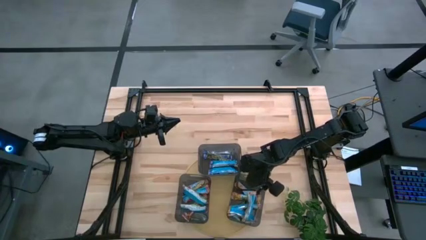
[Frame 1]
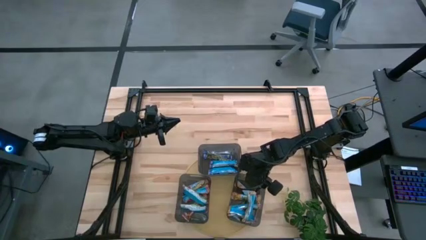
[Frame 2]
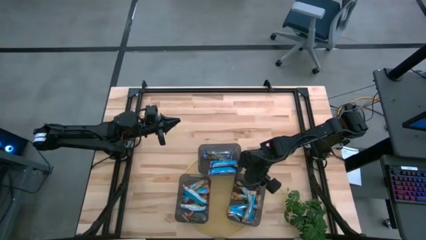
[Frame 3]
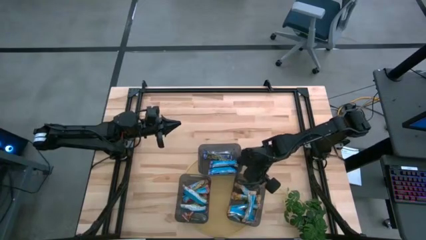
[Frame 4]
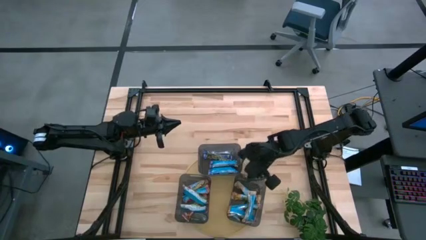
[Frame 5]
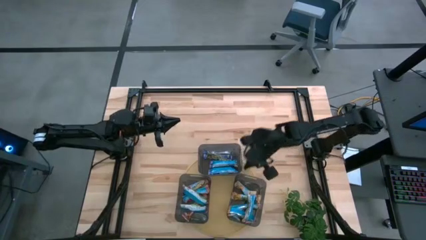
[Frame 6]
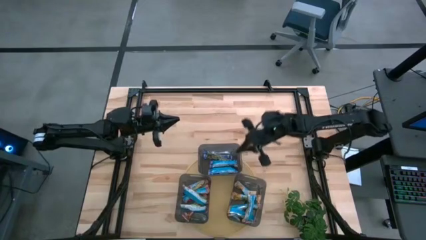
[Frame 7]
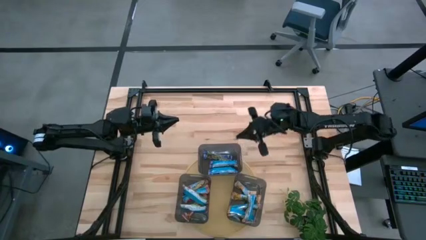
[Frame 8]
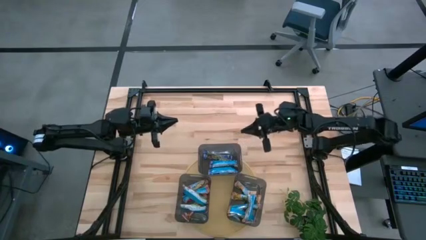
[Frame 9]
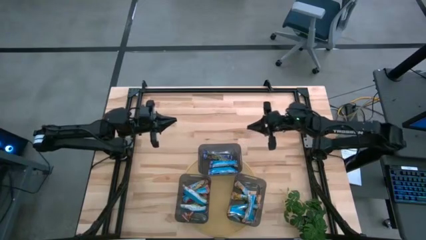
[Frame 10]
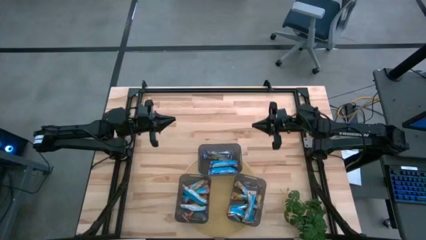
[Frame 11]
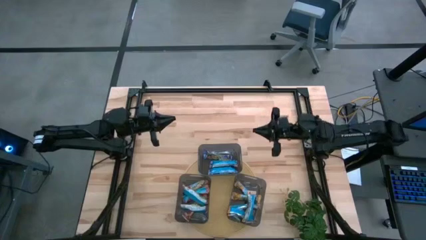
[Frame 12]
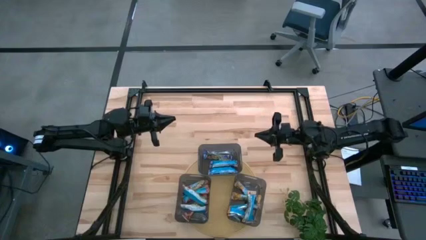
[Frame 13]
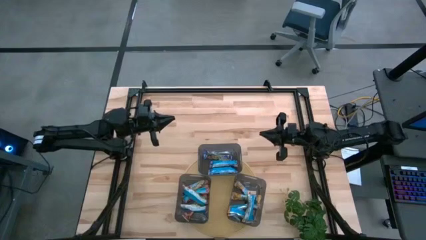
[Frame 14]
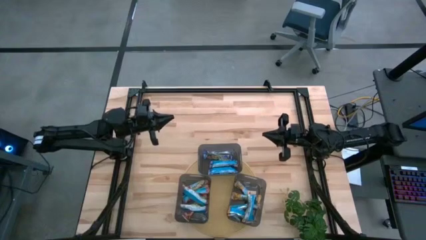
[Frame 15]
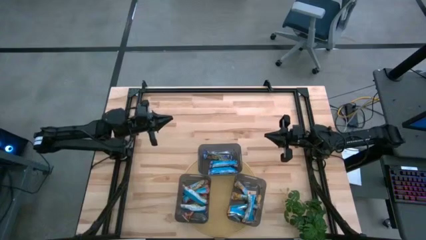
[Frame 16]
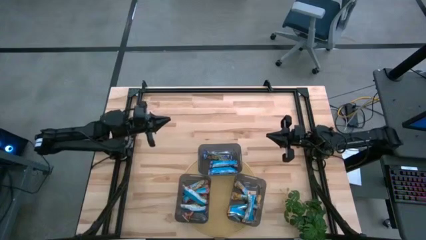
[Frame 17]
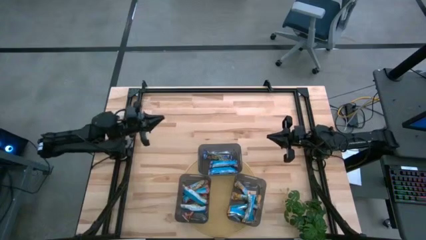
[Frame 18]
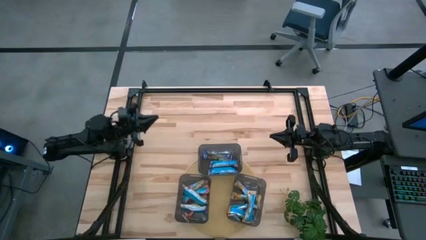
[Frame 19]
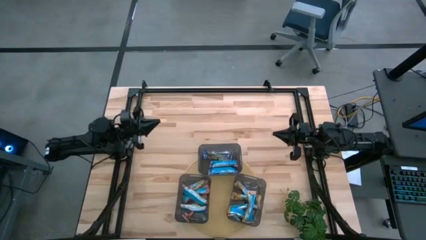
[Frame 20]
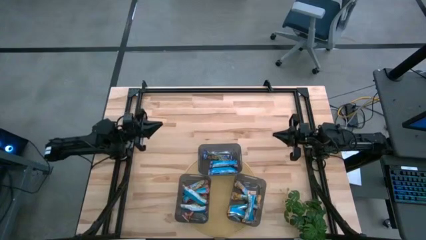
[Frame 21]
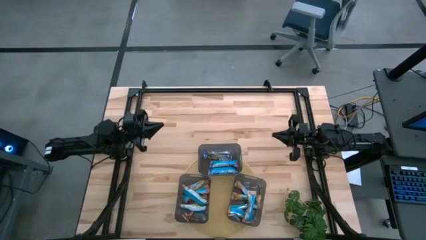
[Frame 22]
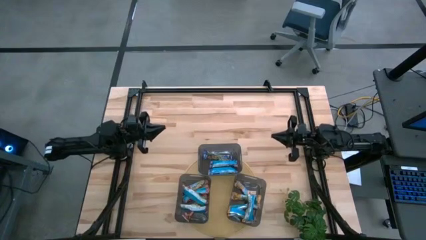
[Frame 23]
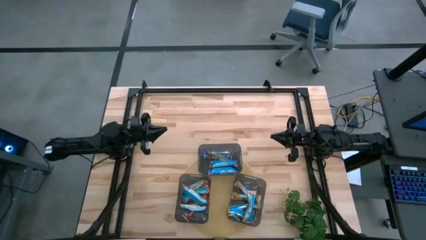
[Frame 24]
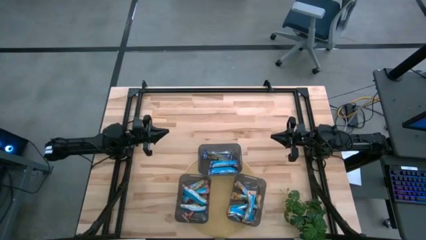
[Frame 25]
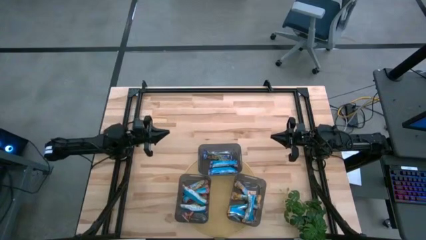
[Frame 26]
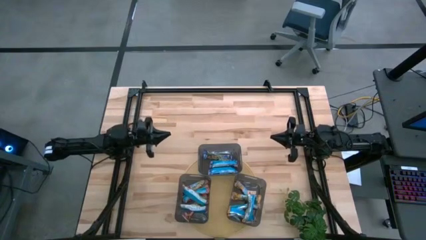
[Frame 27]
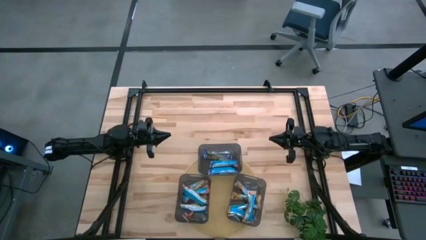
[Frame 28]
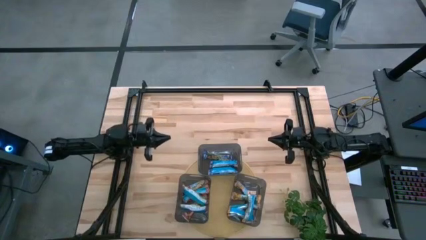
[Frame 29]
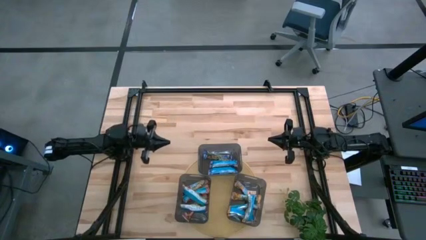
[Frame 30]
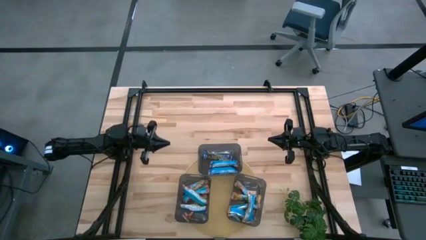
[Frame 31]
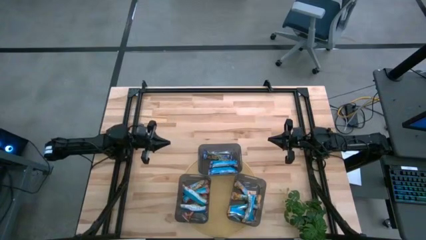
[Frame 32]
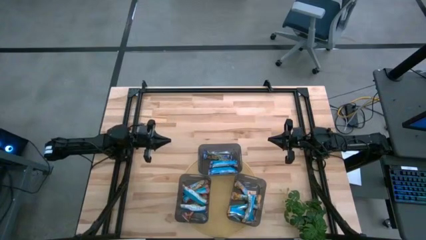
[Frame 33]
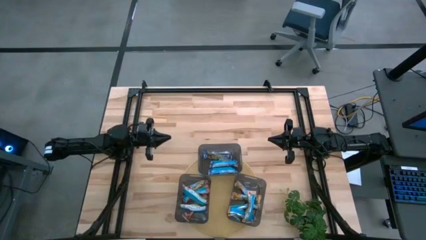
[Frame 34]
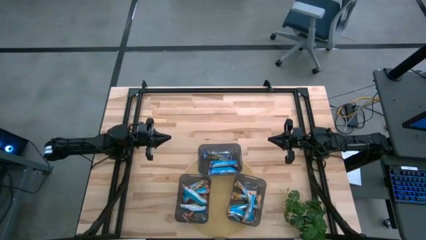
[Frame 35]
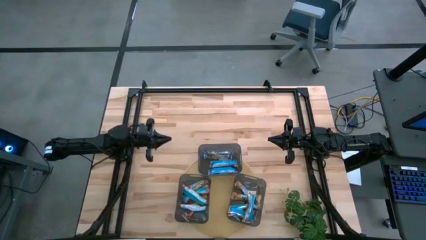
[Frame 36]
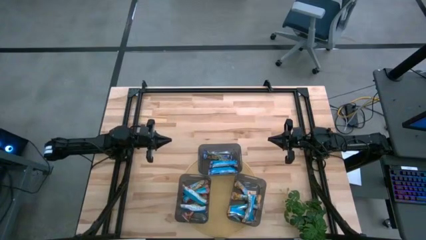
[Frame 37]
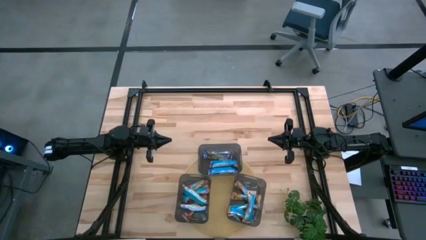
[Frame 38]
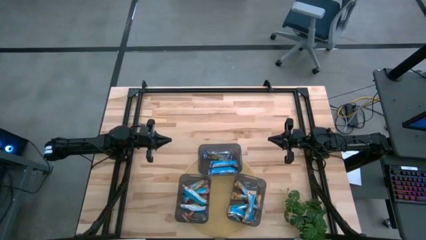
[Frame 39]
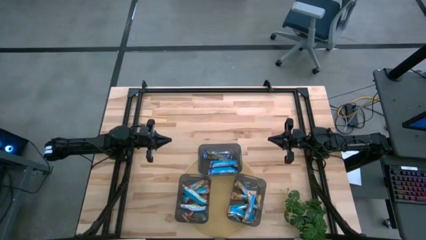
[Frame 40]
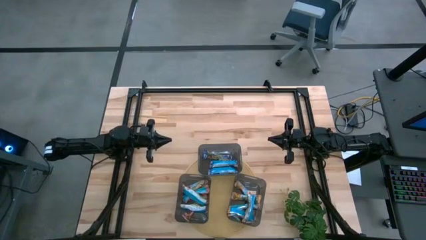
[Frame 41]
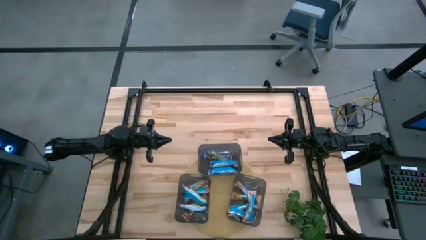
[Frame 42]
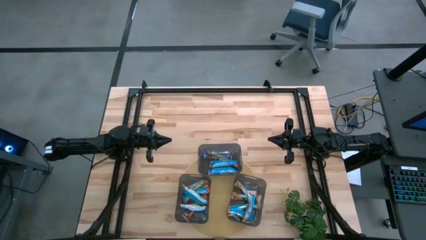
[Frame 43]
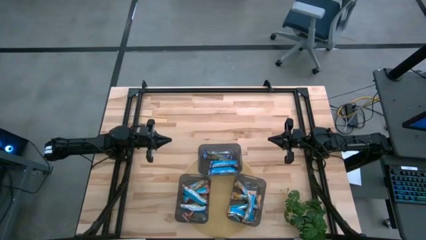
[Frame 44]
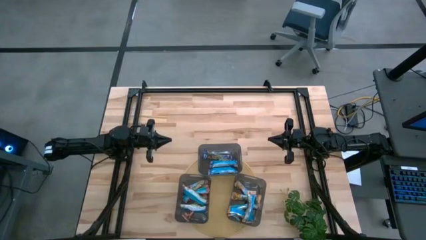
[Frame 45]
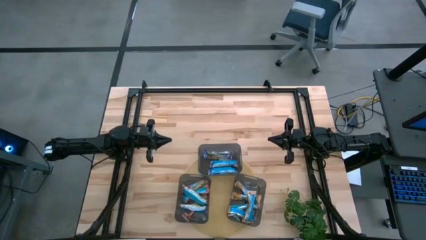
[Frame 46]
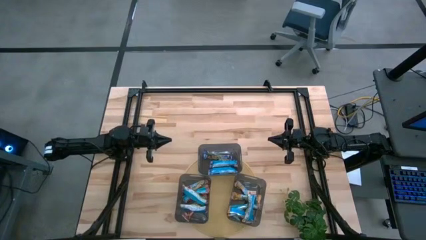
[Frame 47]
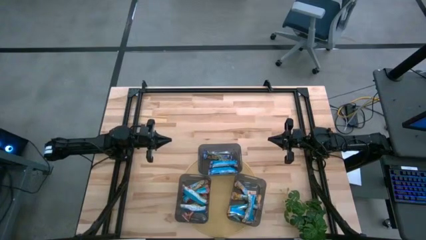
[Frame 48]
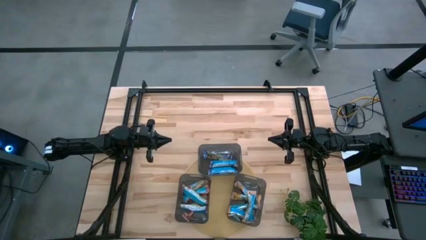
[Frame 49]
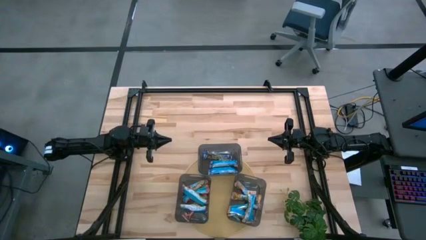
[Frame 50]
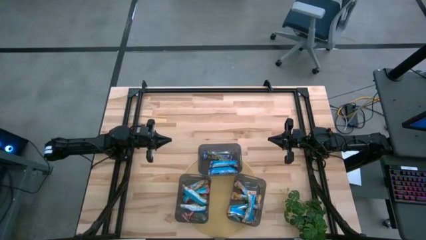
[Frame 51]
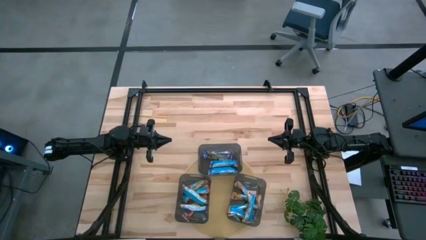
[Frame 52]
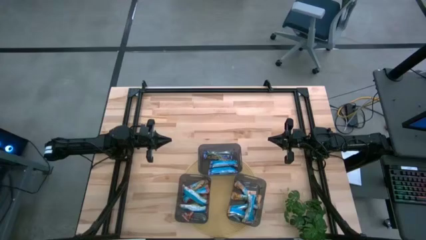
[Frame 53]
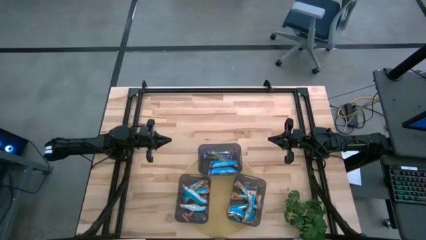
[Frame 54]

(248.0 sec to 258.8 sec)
Task: Pick and place Granola Bars by type
Return to Home Position

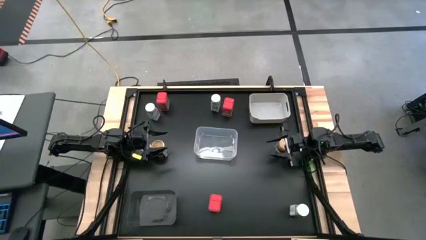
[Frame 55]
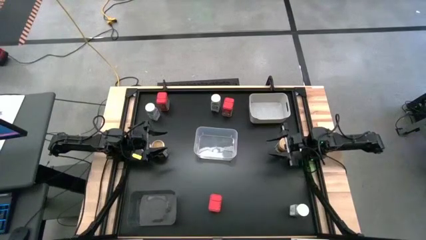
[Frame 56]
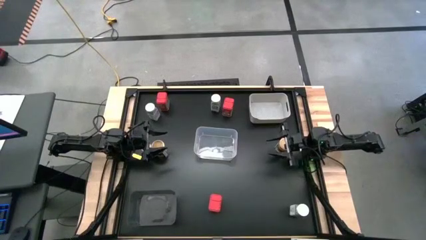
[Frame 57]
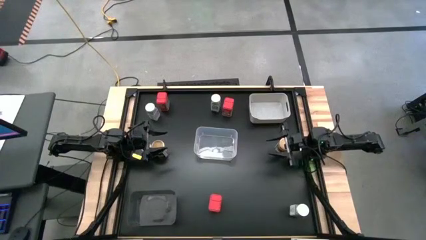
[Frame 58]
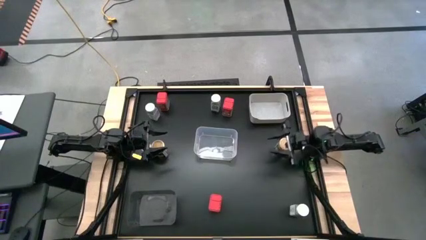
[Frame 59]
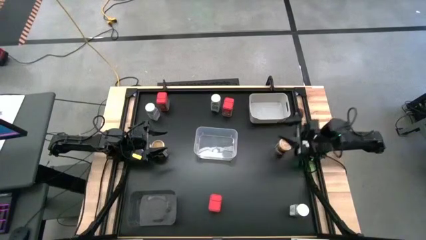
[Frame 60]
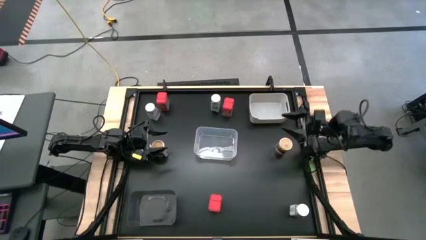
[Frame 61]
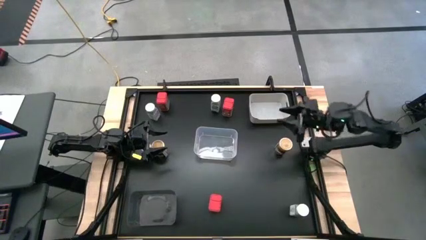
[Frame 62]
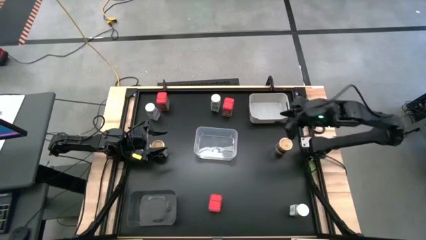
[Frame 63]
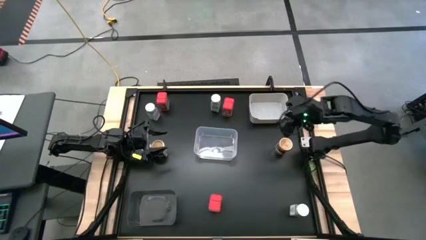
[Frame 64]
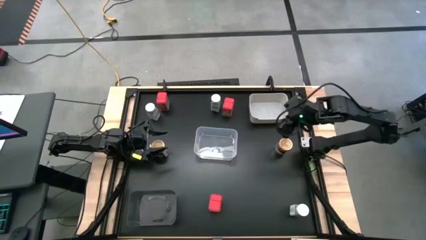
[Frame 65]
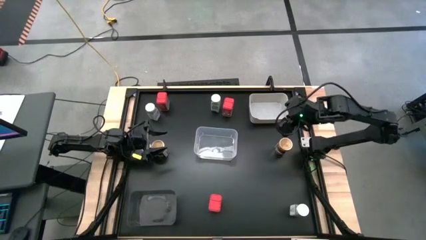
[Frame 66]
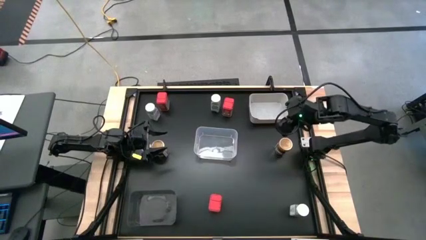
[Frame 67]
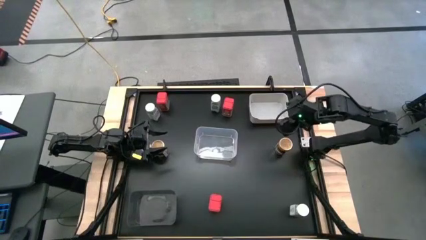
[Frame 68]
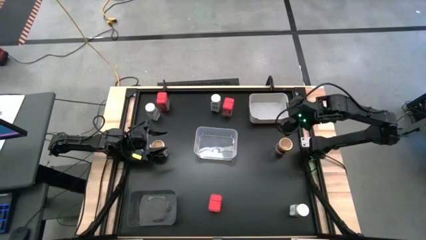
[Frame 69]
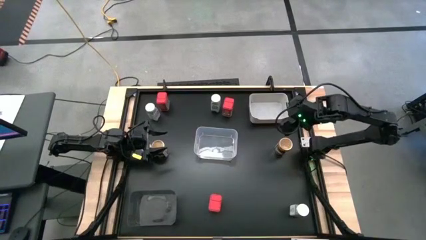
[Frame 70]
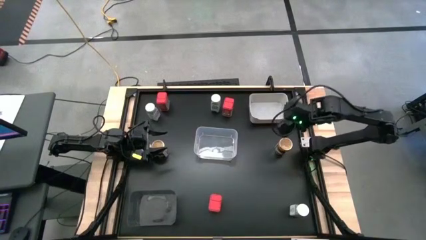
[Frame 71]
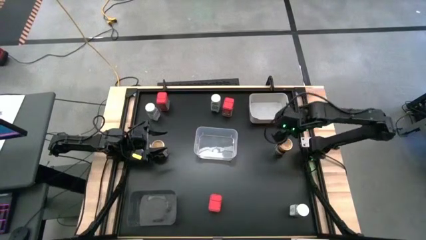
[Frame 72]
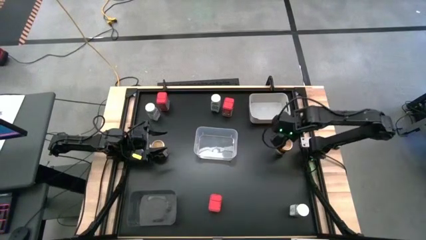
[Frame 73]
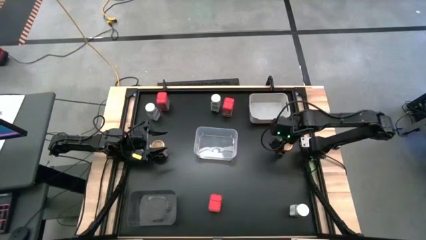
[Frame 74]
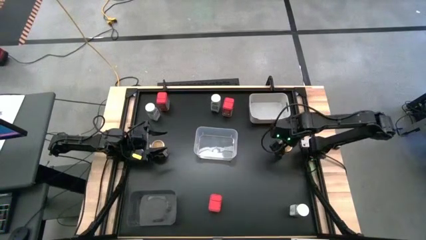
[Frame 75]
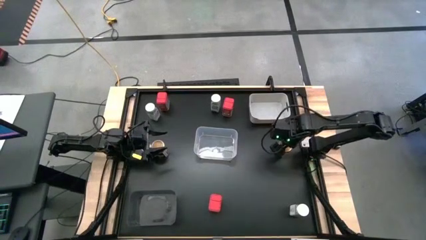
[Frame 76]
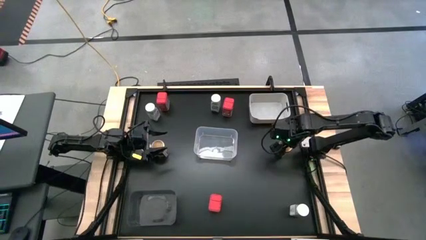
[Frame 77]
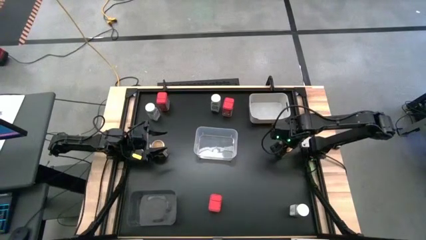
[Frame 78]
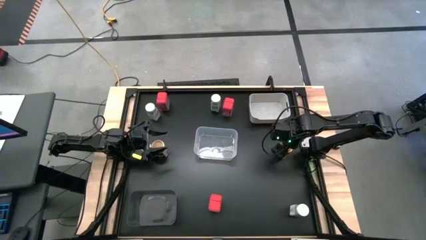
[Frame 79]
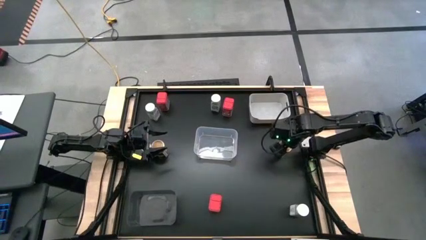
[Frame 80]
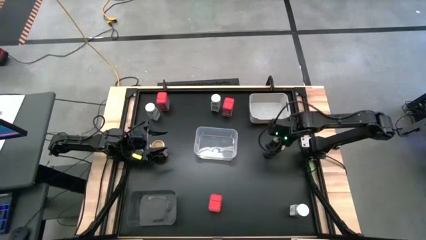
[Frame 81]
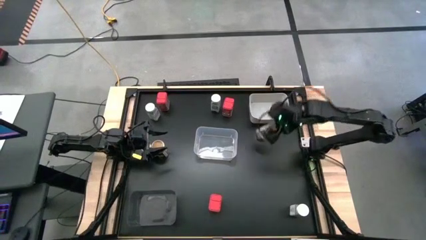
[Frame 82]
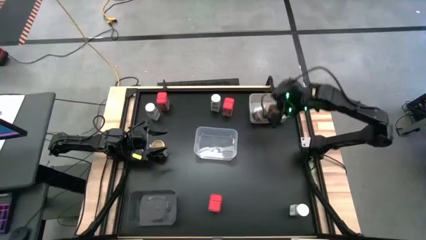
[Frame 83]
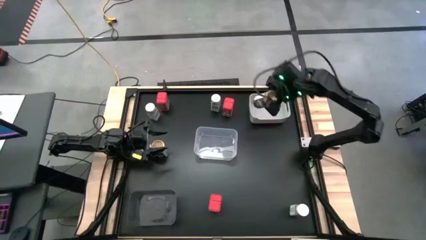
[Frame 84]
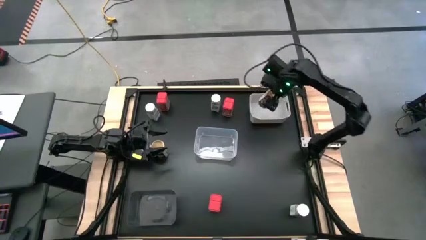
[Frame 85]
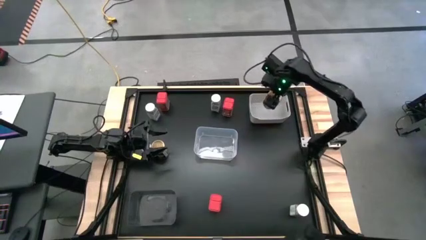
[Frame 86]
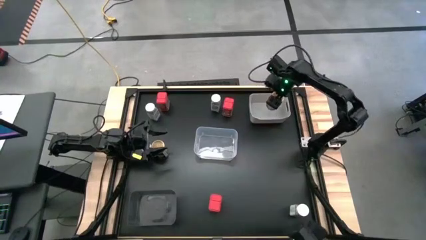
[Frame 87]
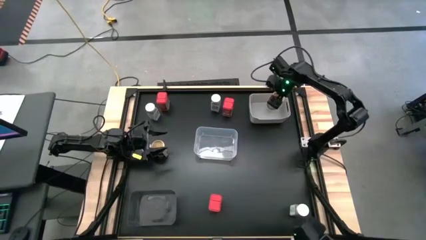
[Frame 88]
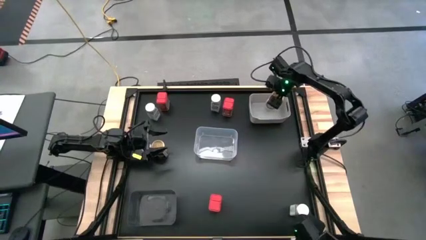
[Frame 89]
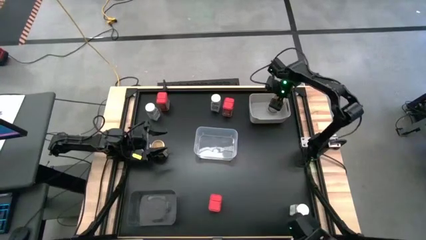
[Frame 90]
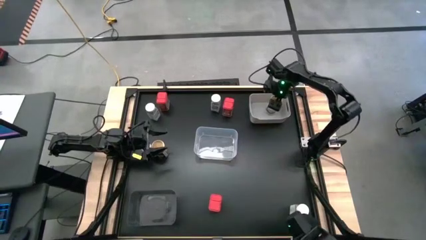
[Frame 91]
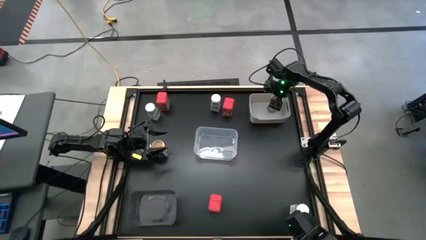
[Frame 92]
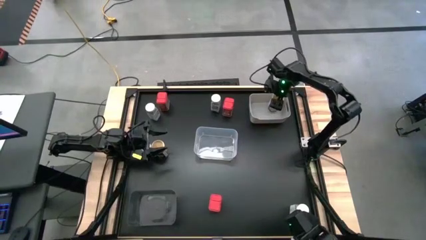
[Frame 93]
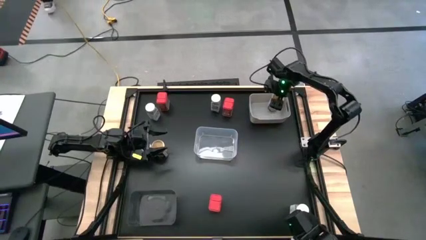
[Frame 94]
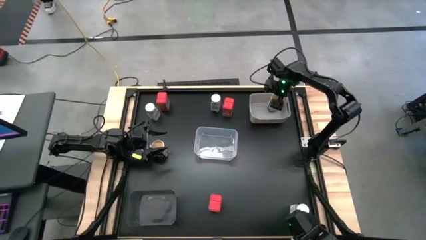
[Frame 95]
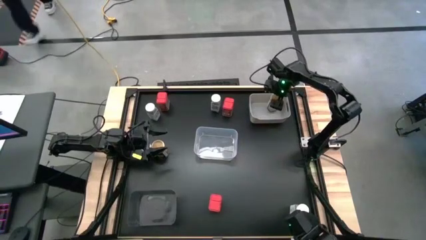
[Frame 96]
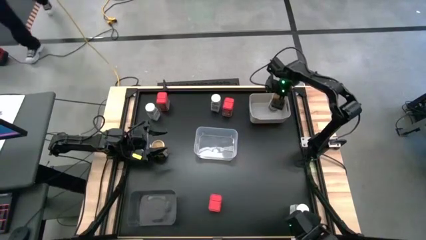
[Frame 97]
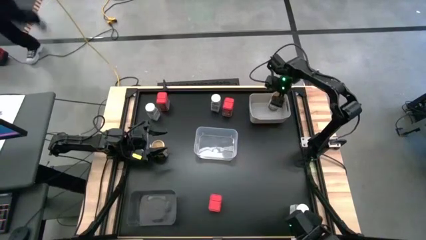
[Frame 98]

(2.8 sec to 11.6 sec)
Task: Sort spices by type
Put the gold seasoning bottle into the white bin
